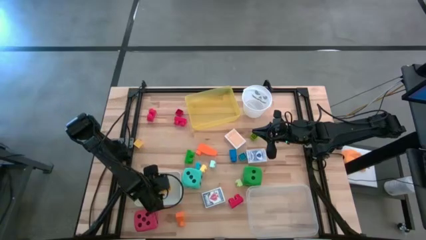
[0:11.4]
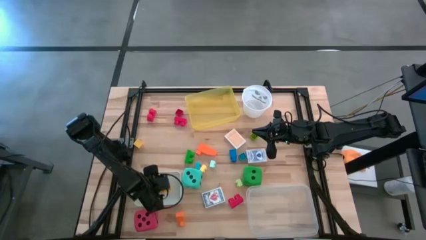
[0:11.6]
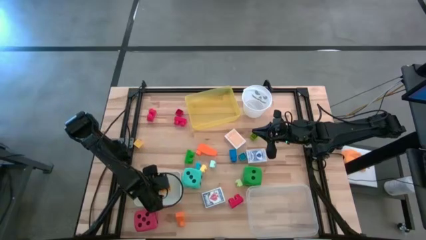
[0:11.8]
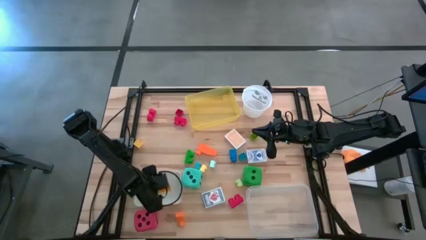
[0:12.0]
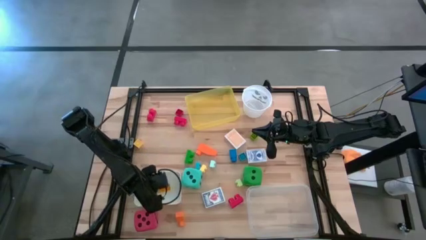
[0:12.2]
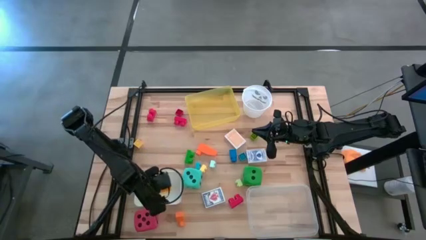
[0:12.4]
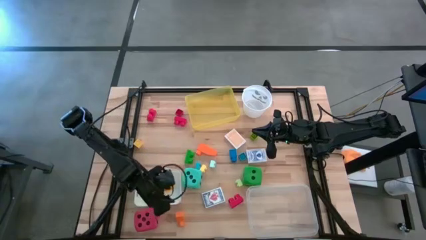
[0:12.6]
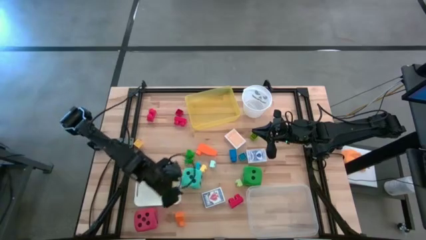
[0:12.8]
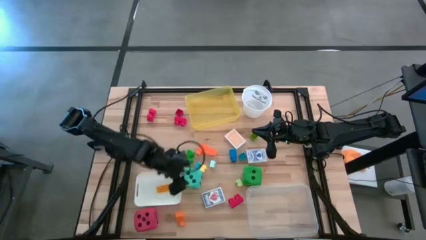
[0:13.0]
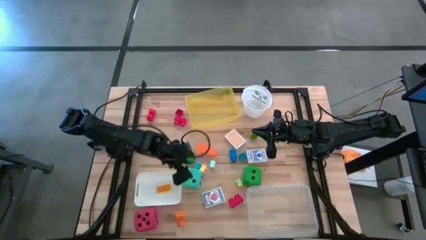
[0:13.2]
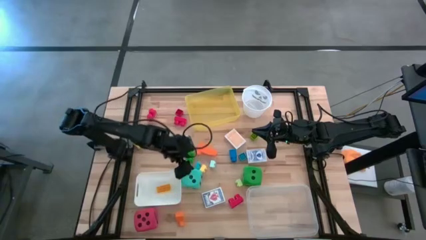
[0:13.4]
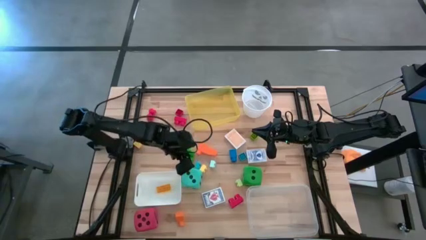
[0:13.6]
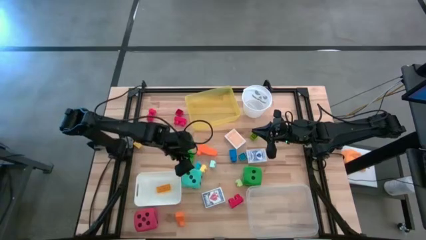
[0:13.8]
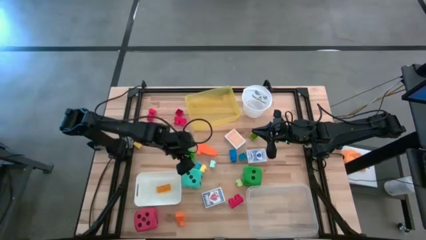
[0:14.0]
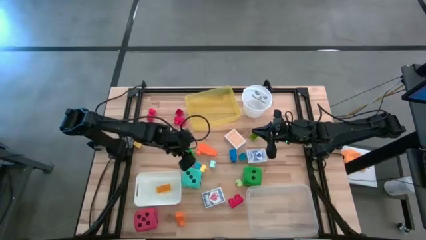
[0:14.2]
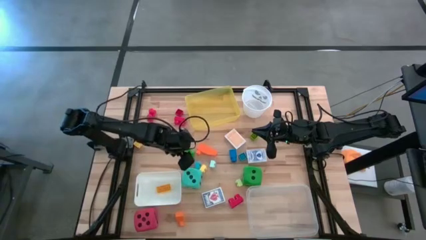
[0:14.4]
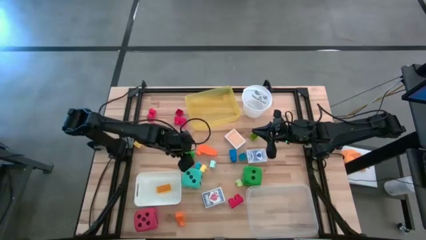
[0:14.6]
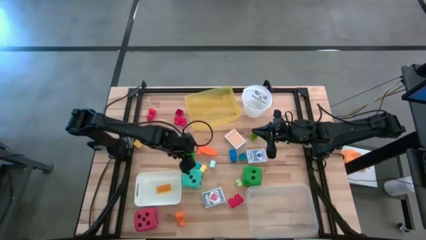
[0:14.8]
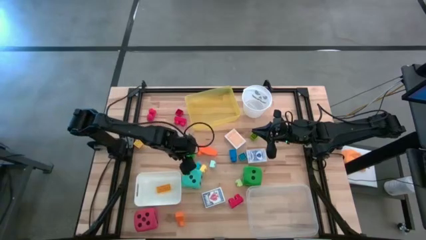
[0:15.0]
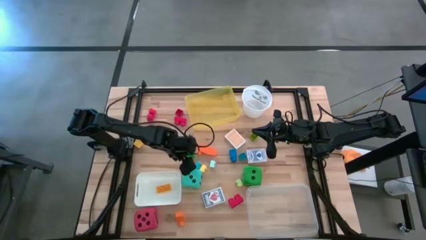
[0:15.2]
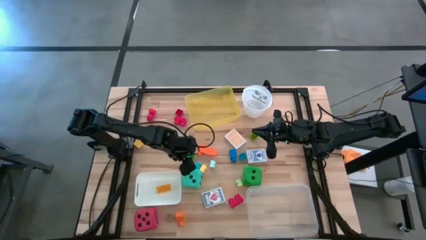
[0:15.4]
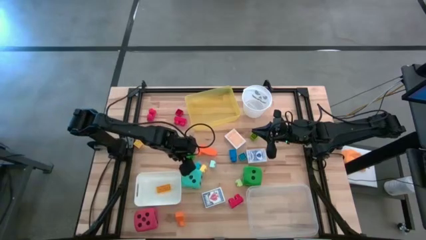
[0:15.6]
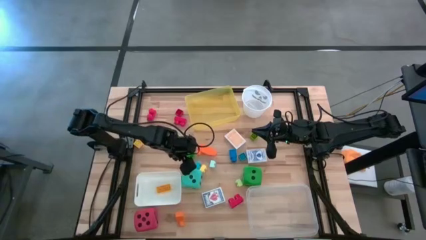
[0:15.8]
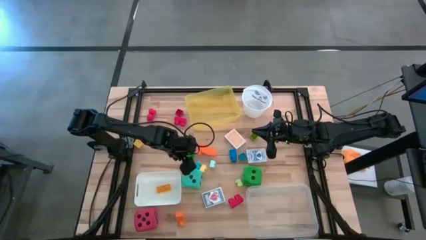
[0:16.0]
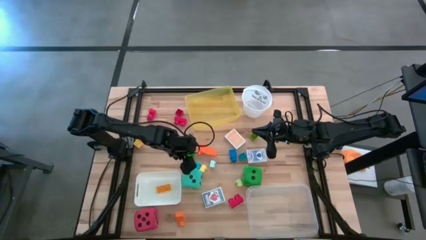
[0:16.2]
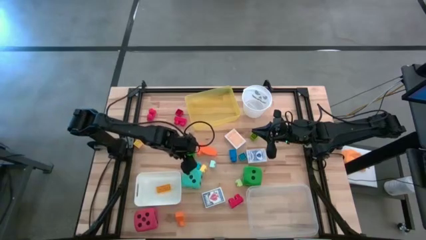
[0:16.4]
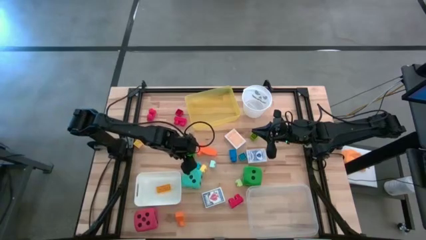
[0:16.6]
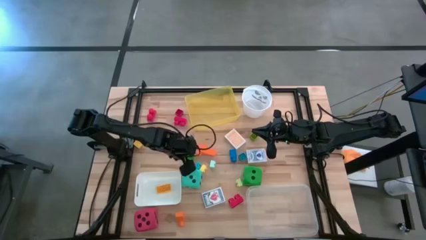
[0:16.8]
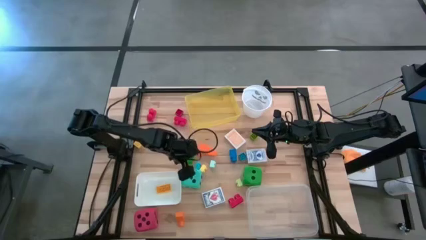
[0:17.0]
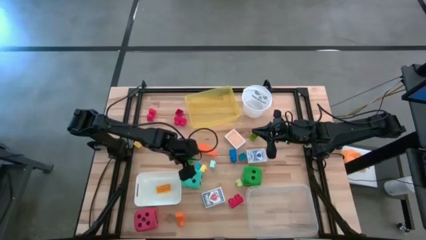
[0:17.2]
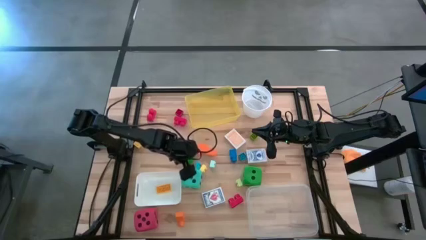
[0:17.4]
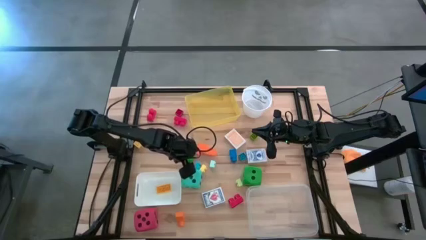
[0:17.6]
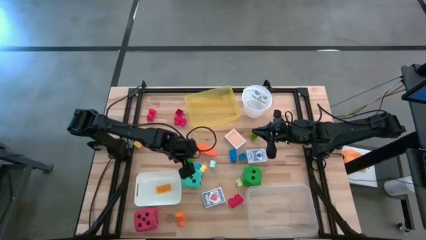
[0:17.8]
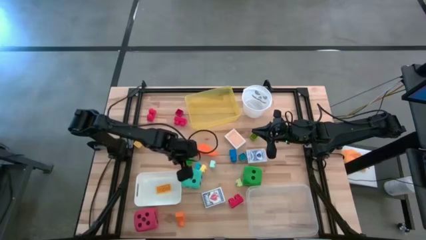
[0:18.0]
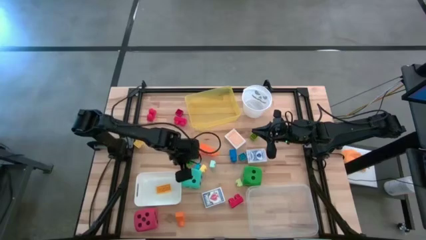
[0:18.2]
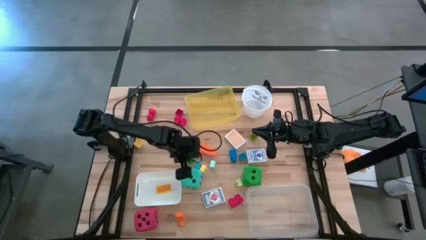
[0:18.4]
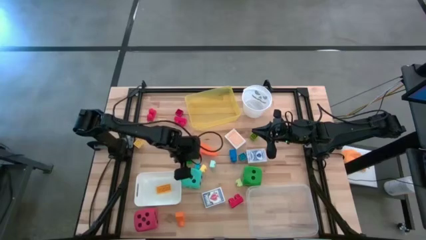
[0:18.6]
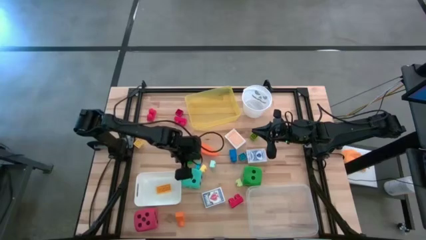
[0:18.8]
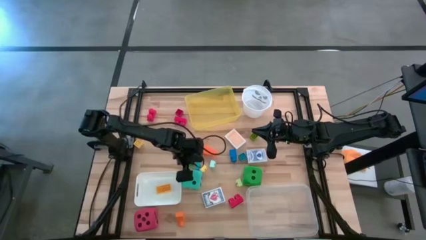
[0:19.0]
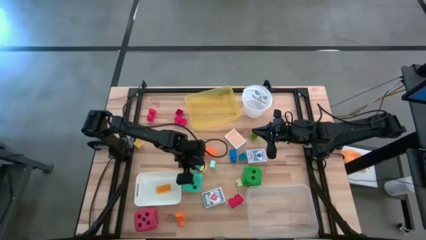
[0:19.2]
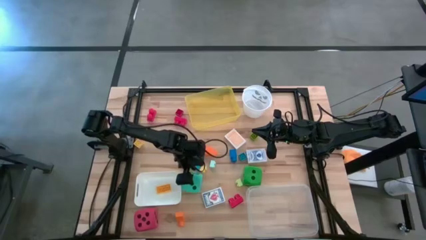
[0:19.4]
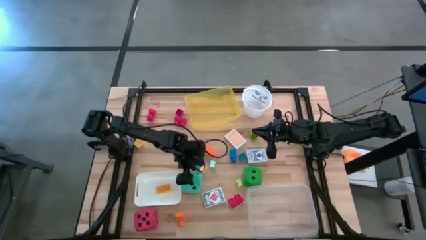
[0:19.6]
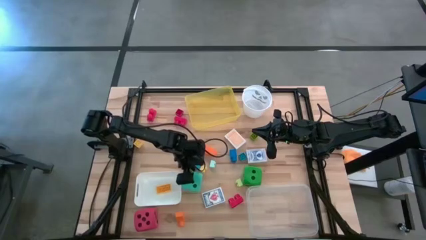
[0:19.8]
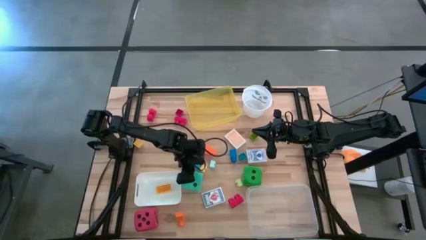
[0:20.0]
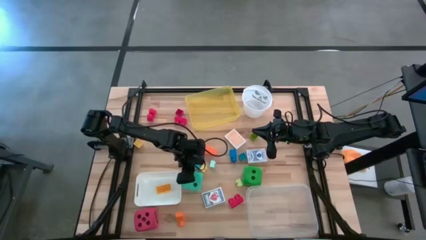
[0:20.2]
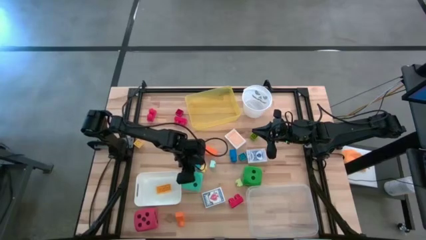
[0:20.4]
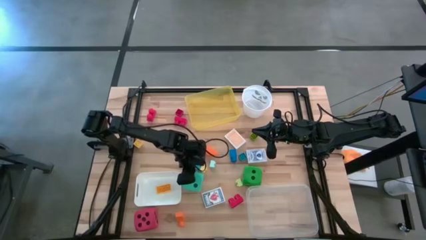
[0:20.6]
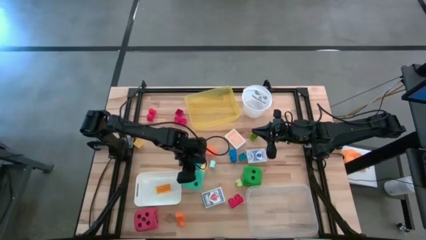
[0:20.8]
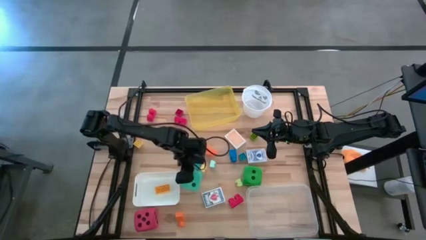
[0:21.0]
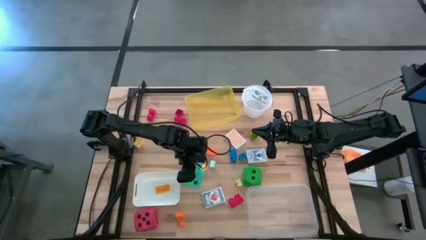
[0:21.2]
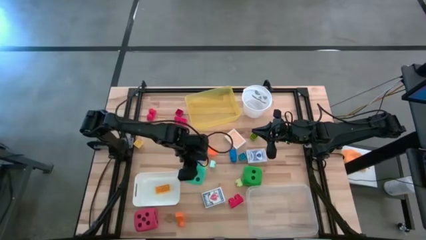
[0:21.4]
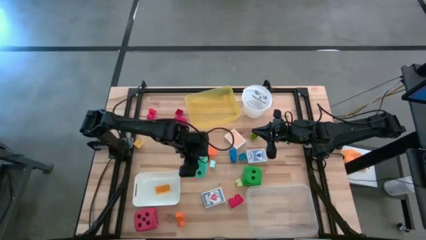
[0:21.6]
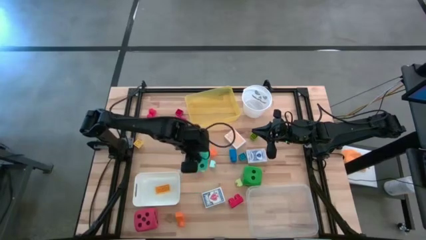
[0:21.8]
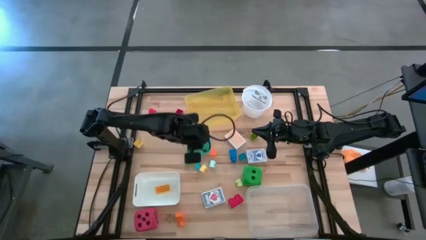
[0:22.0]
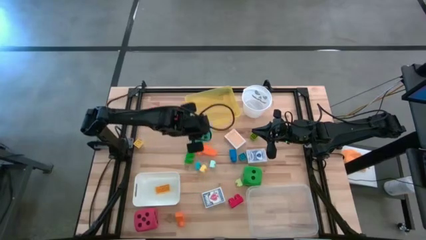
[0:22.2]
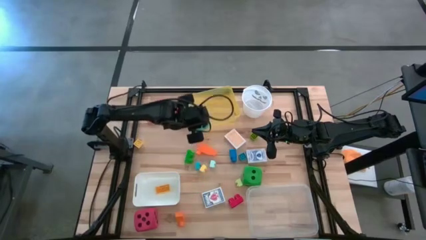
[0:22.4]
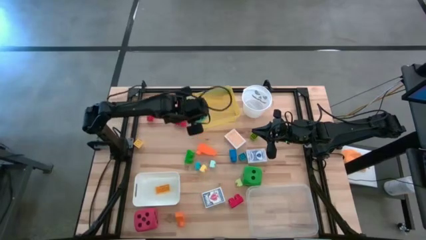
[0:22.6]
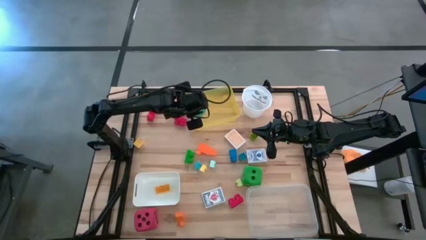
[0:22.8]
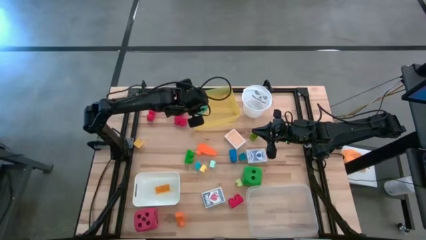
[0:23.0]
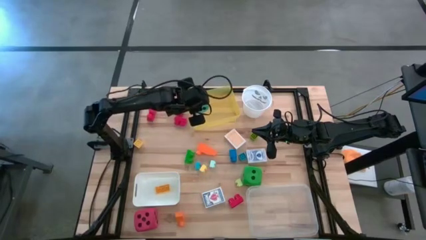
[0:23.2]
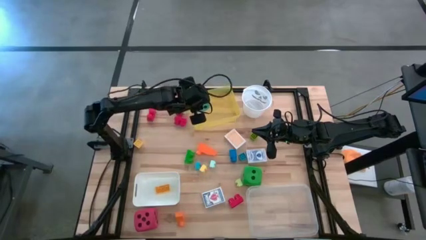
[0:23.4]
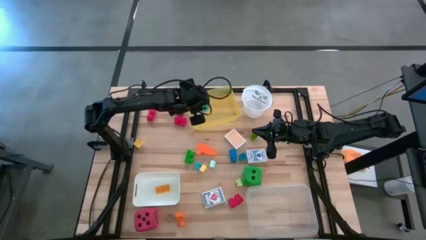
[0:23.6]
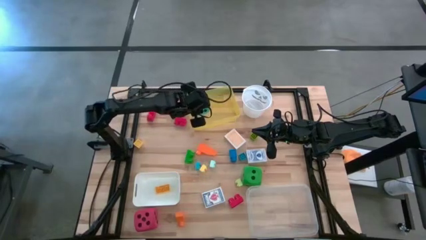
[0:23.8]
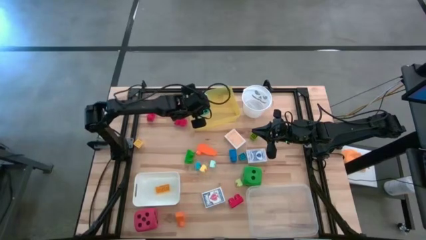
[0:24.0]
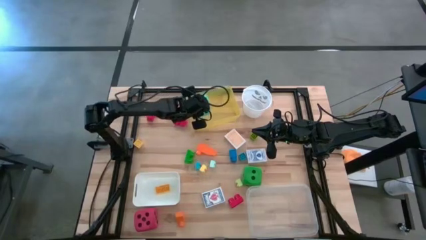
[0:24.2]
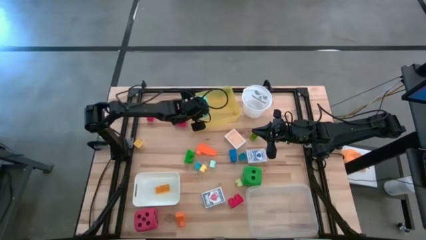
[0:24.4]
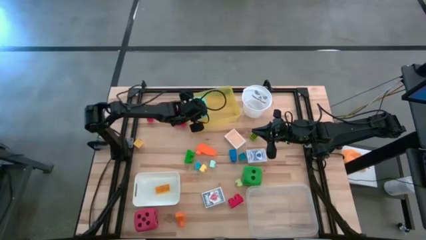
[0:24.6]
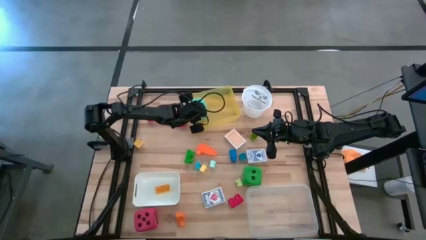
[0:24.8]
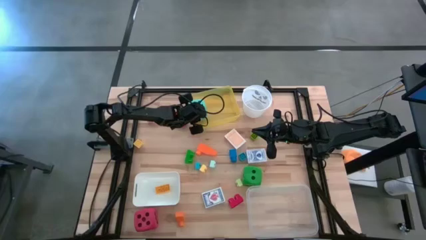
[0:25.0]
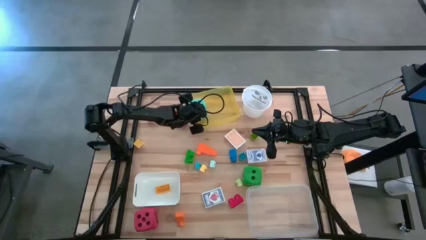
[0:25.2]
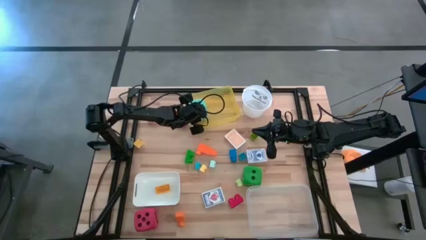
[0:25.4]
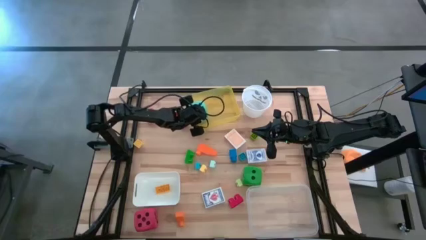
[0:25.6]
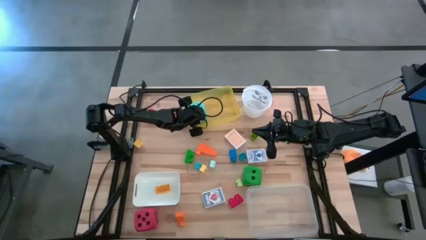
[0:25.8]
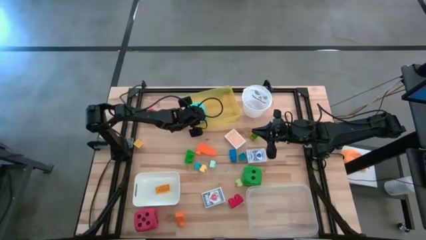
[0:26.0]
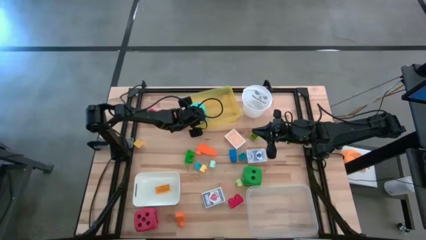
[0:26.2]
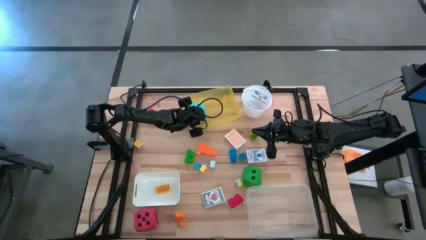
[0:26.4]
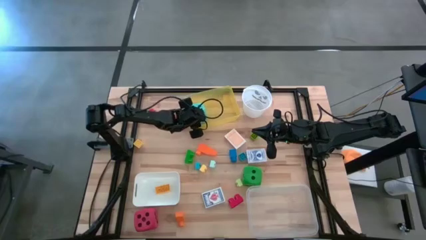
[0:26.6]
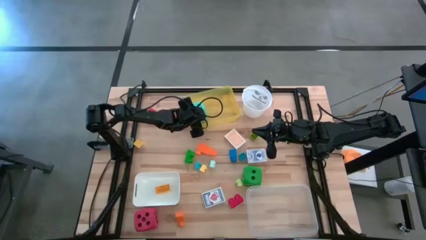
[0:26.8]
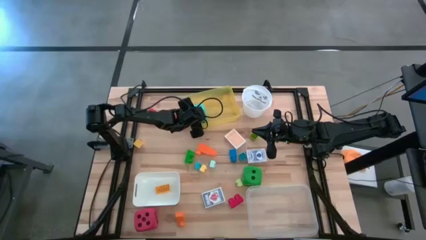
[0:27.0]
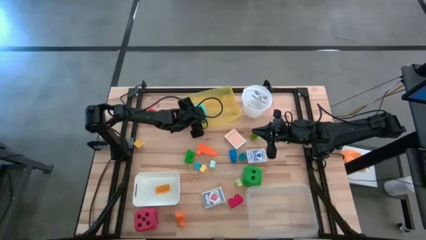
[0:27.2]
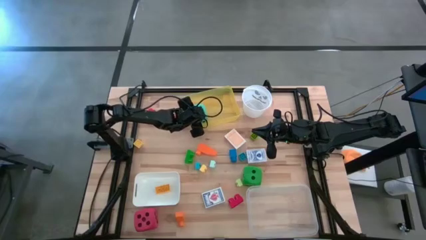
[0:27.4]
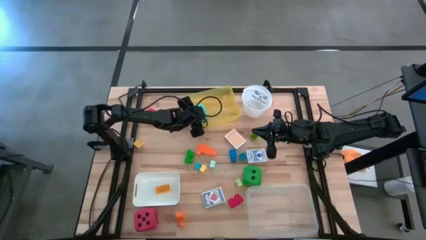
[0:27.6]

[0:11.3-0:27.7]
Task: Pick & Place Toys
Put the blue die into the yellow bin
